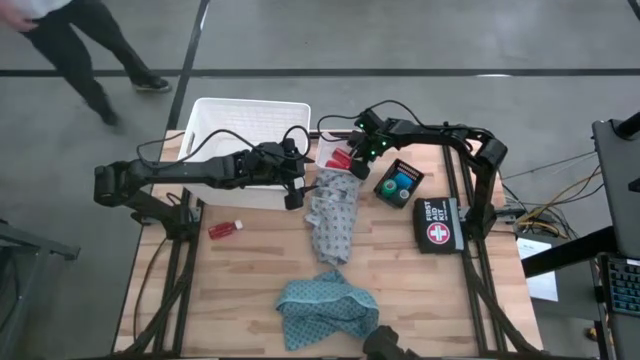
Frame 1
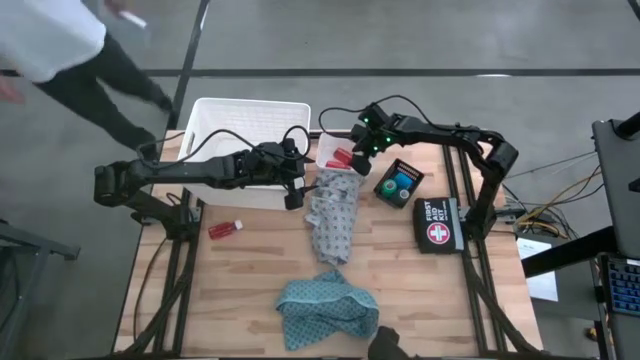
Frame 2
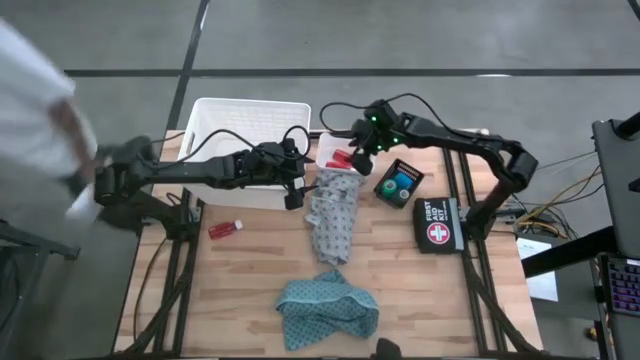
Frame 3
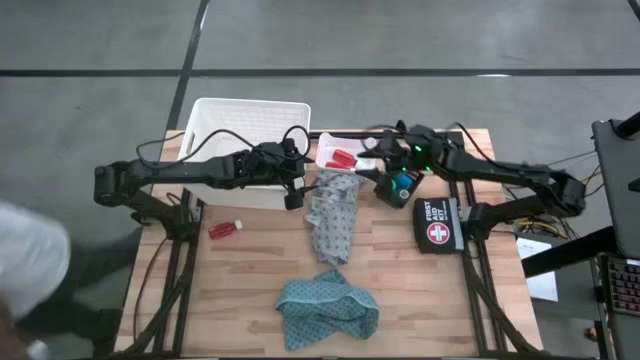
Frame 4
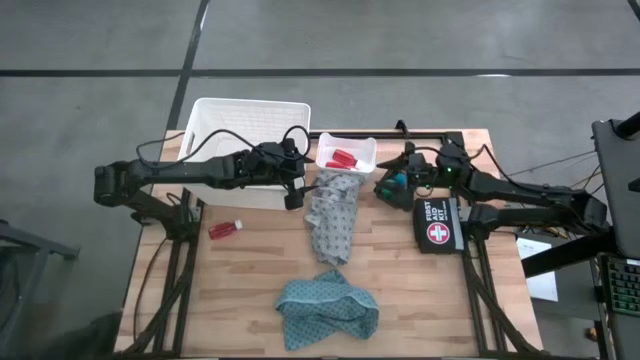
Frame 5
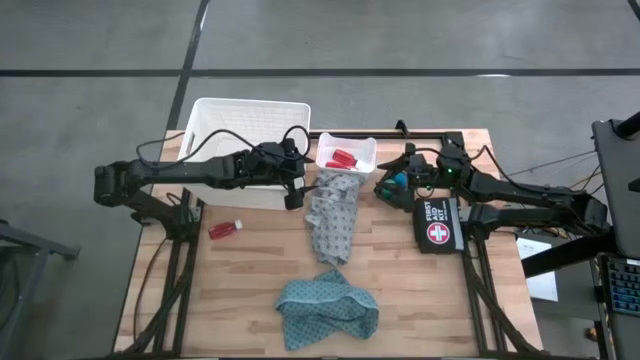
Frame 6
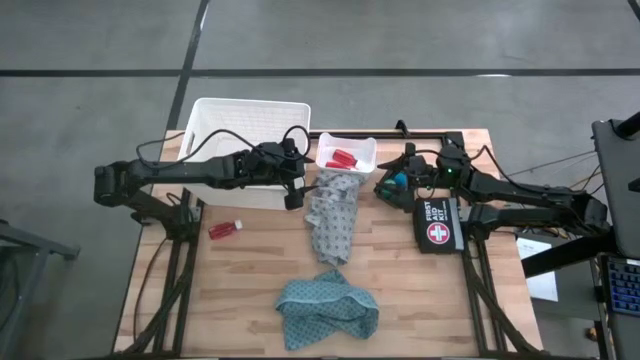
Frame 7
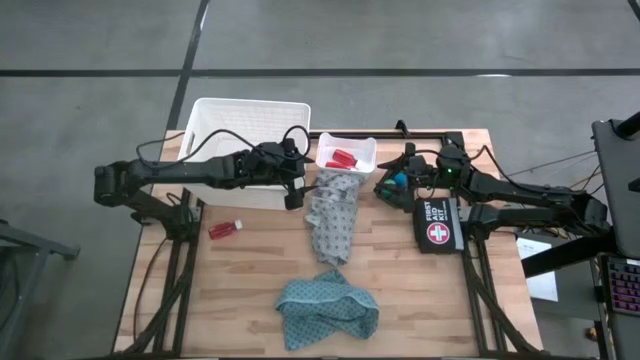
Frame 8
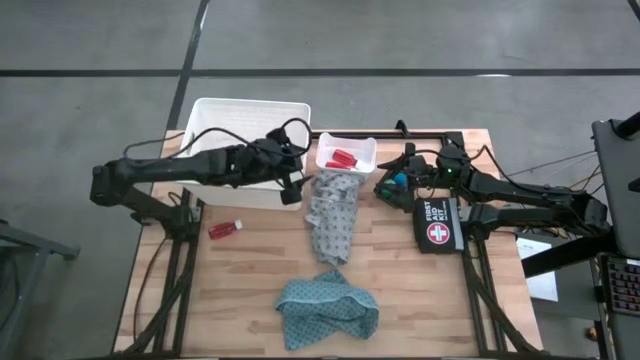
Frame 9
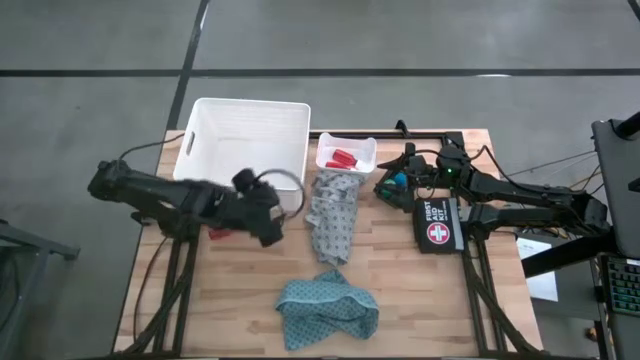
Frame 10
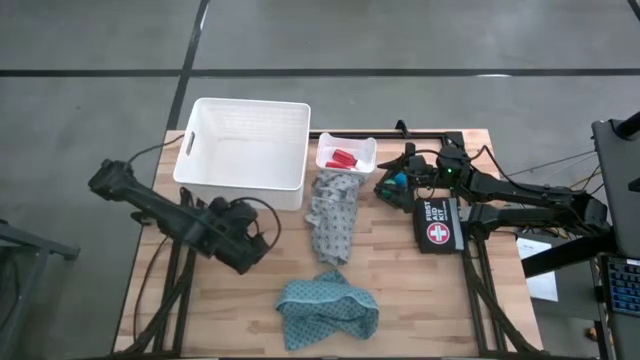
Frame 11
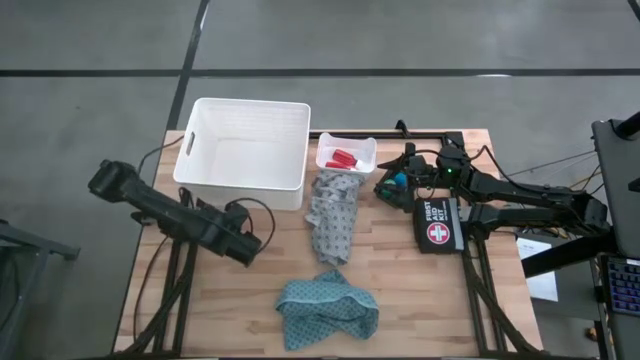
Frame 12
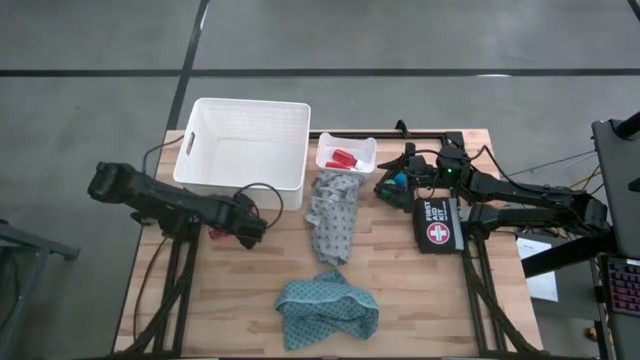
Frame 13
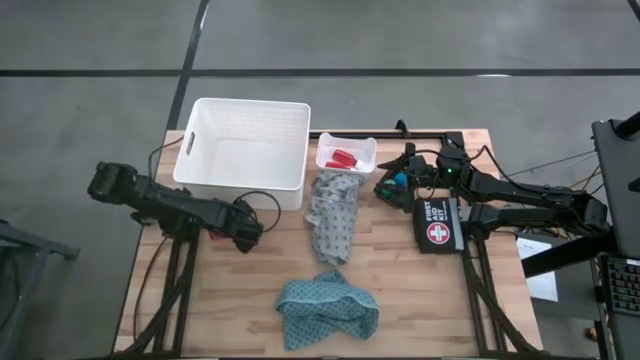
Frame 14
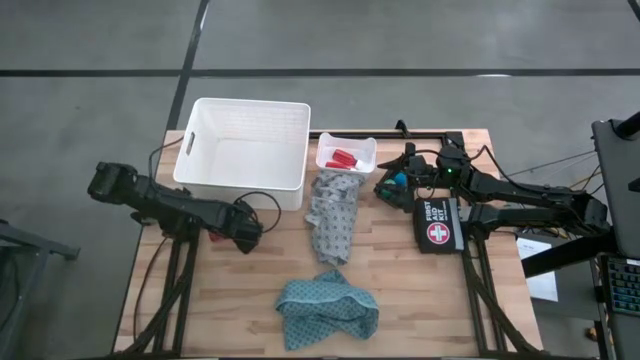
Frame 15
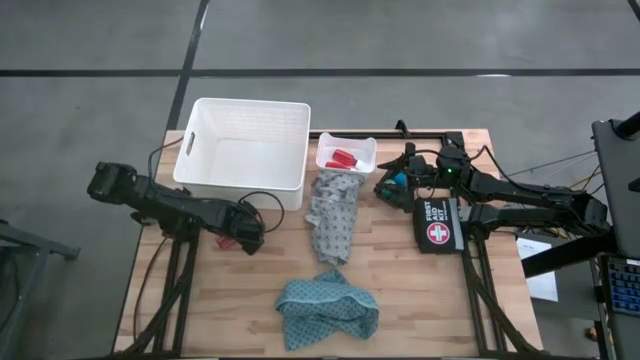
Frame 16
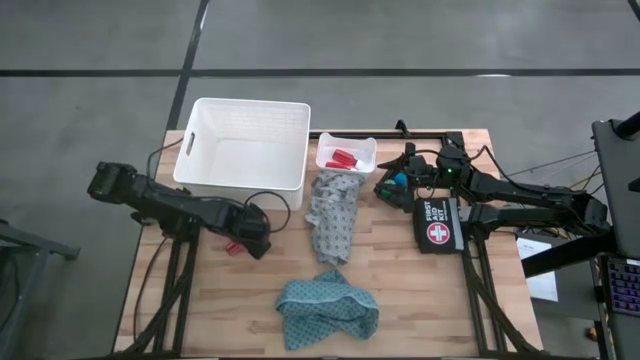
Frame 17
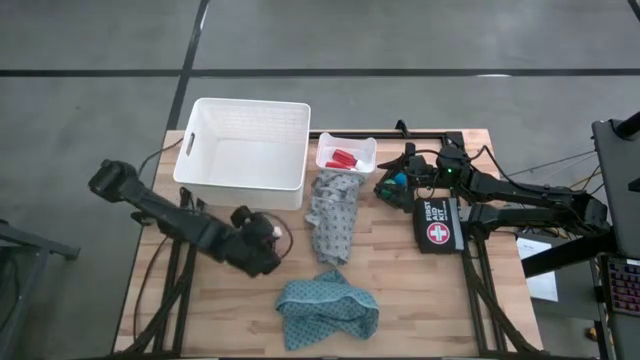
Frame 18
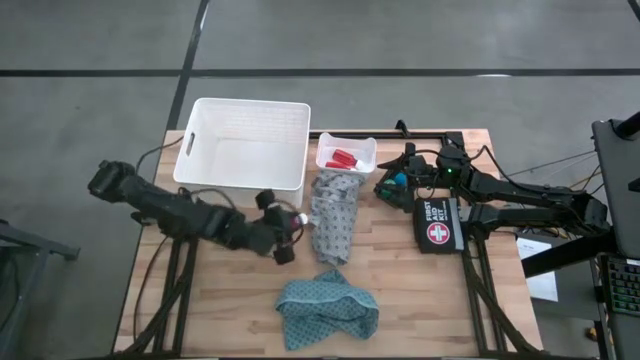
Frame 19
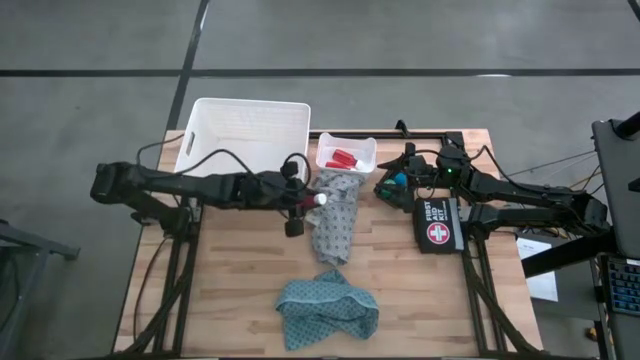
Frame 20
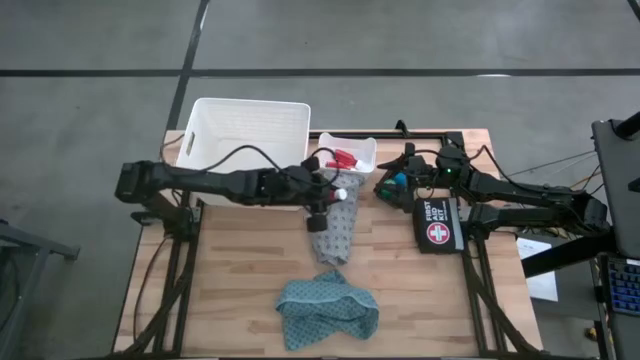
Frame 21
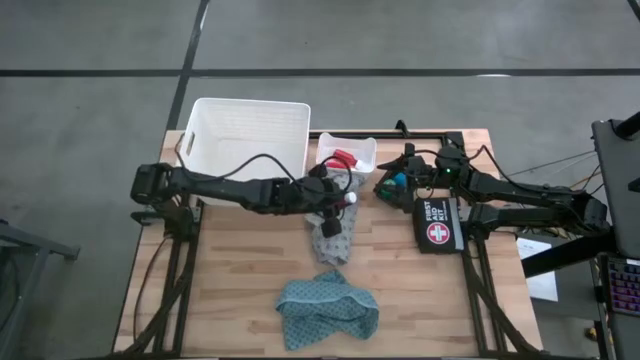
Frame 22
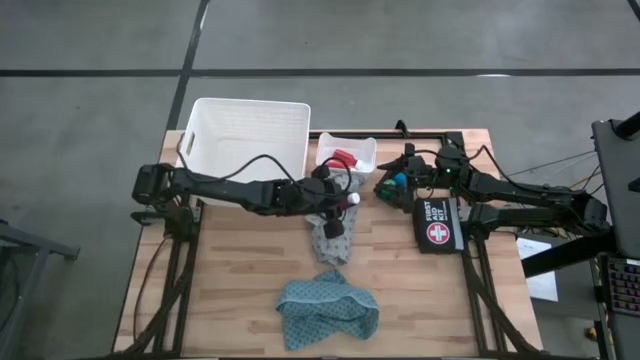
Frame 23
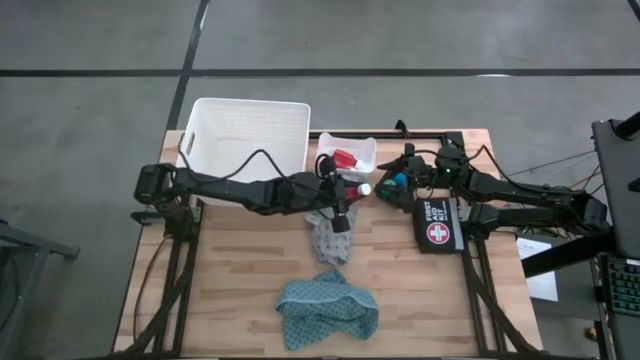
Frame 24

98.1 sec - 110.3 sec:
Task: Pick & Place Medicine items
Put the red medicine bottle into the small white bin

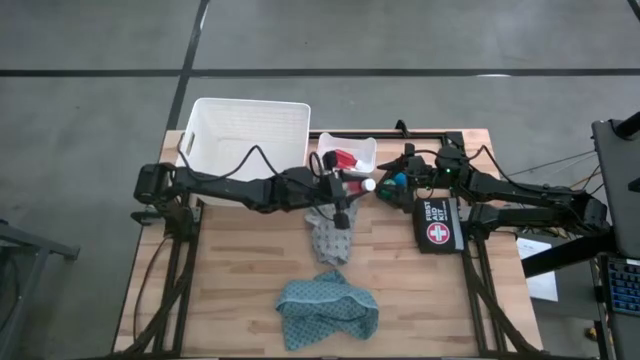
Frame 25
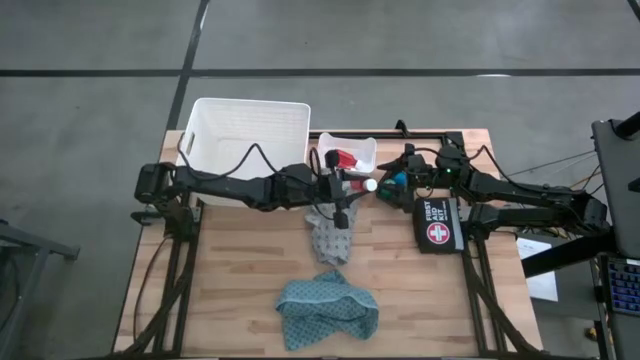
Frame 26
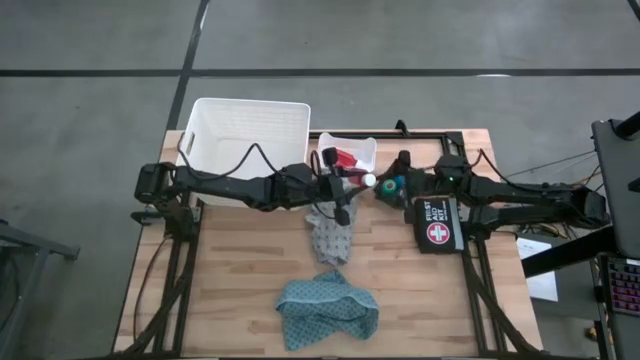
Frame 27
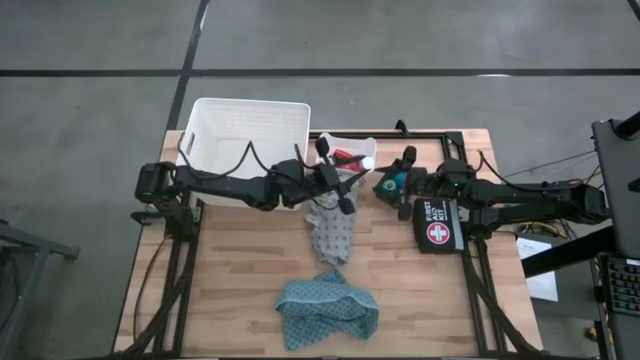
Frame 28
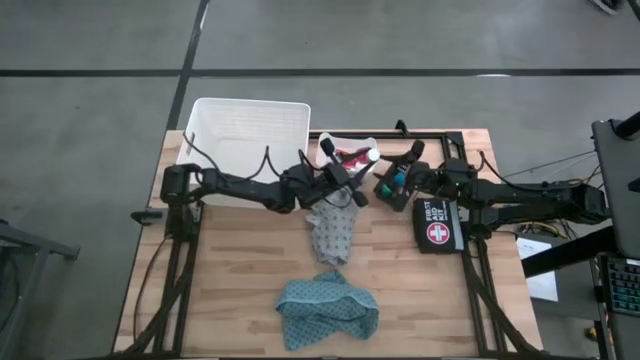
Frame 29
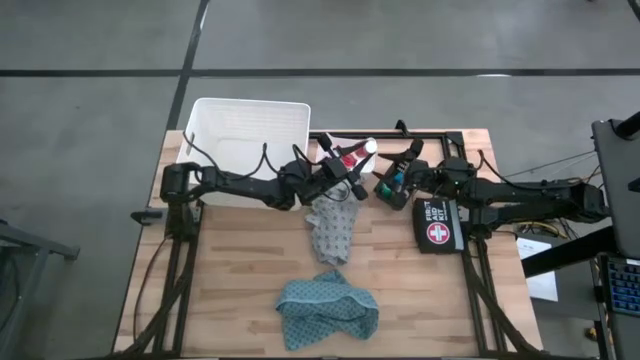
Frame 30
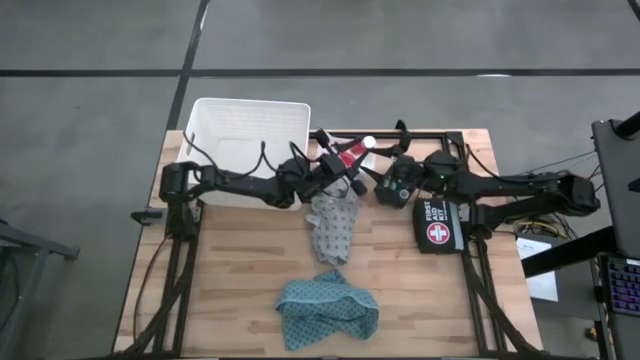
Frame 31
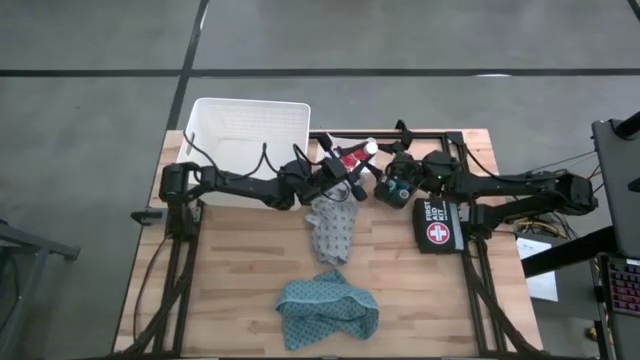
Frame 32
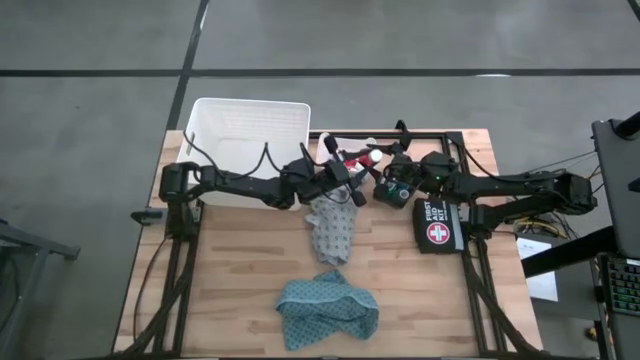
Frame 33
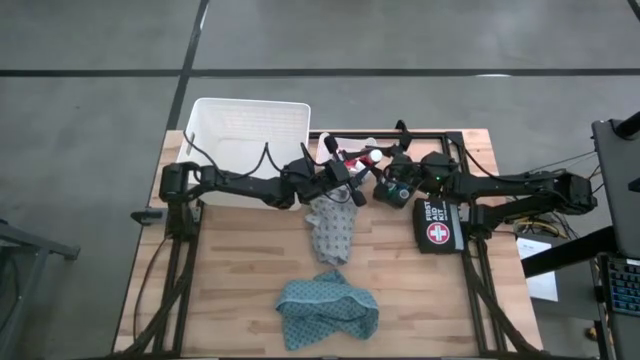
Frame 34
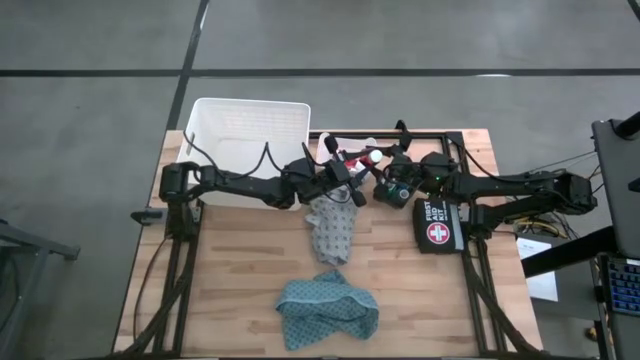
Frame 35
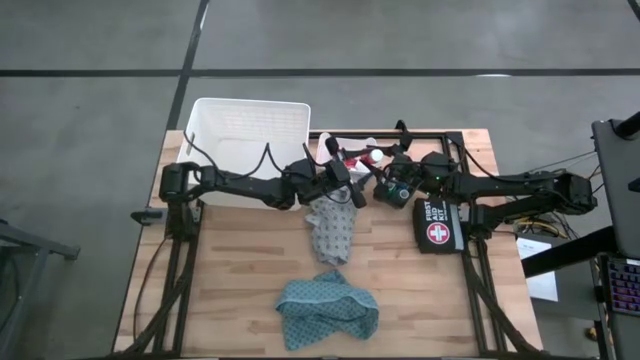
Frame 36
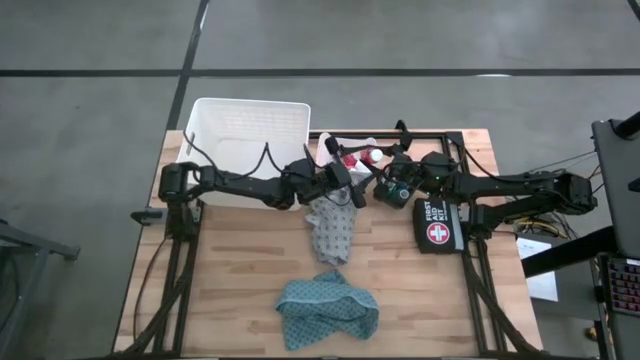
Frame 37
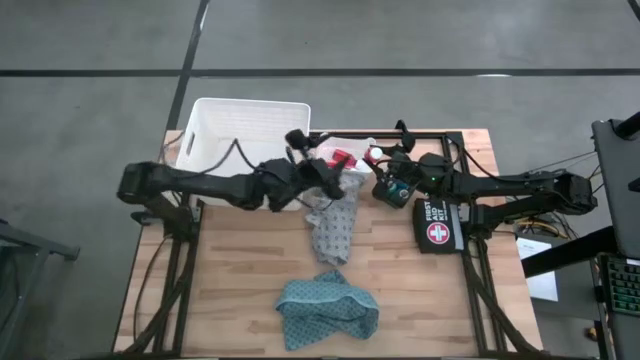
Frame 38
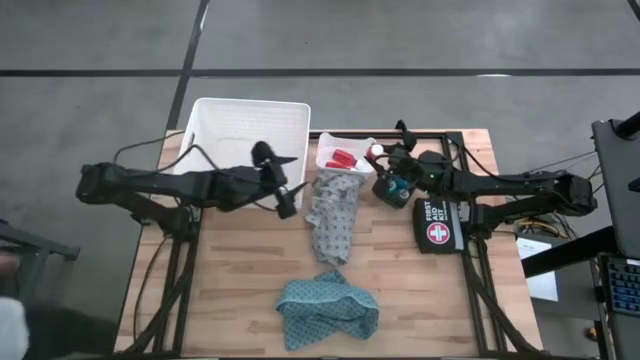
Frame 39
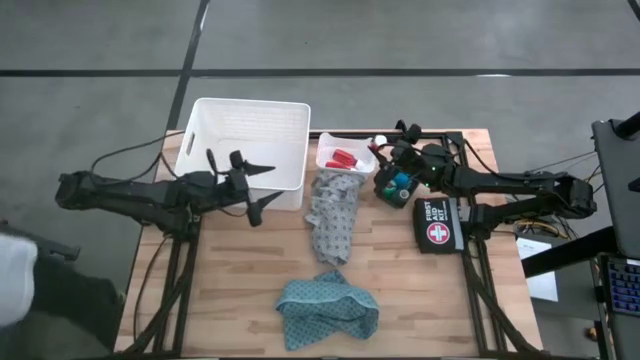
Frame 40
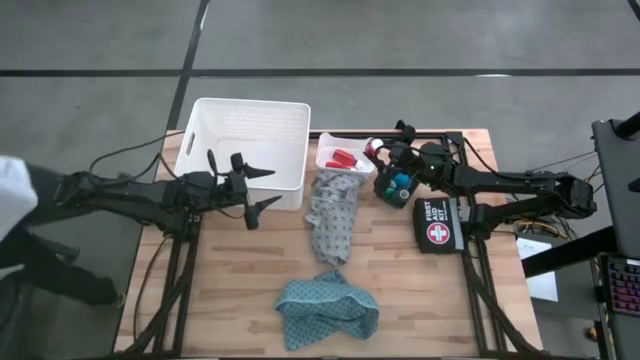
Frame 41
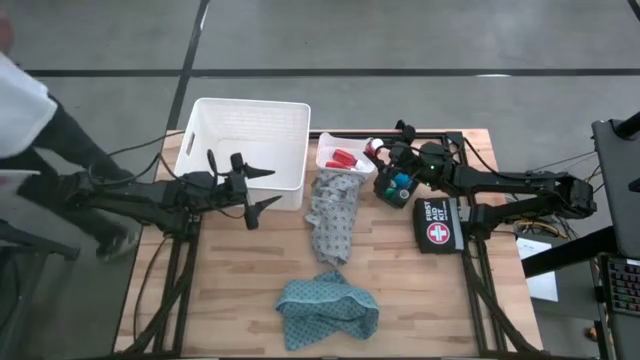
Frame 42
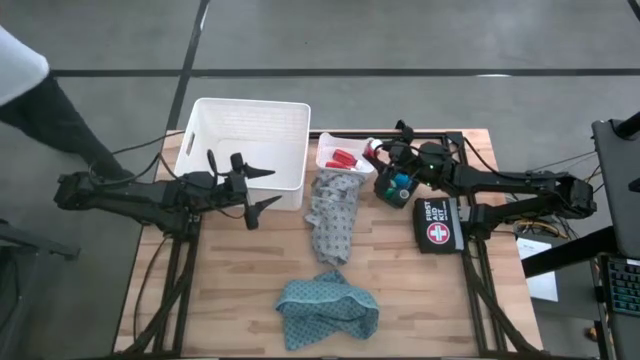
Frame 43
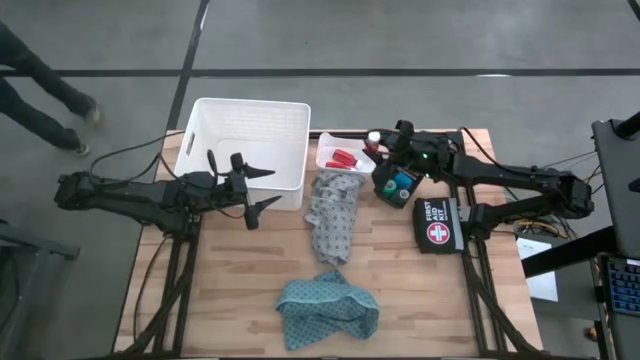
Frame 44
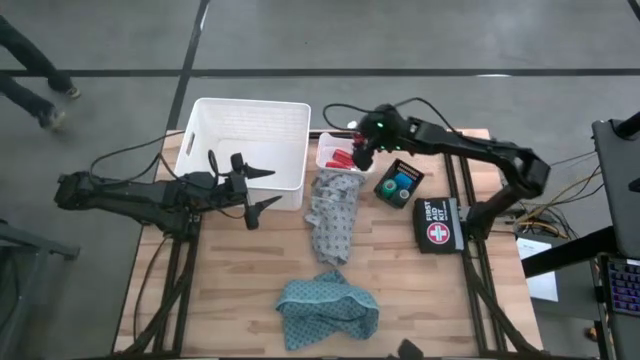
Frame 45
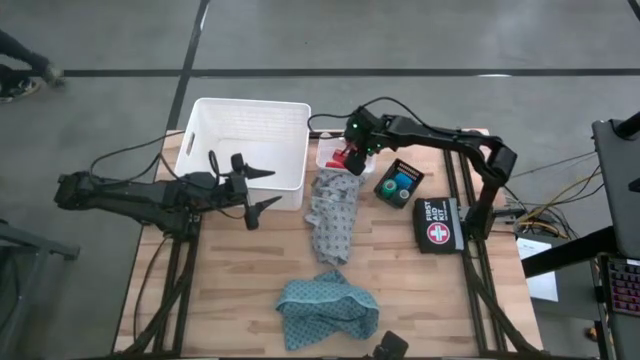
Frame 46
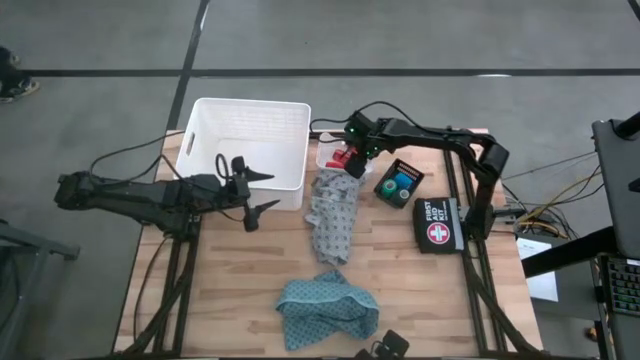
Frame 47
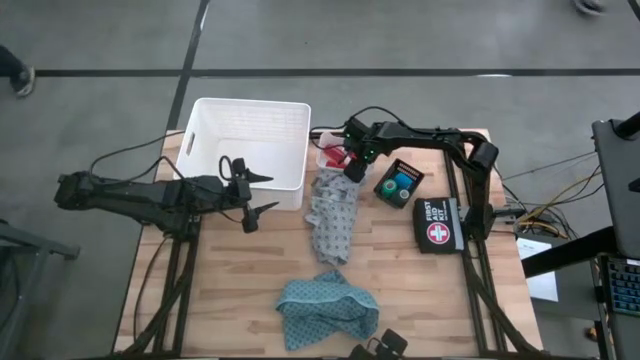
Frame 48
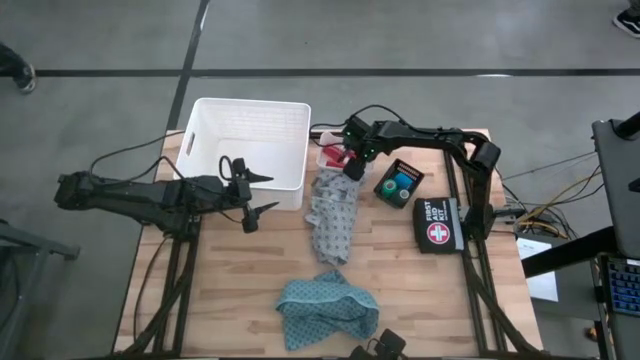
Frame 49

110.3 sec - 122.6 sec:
Put the red medicine bottle into the small white bin
